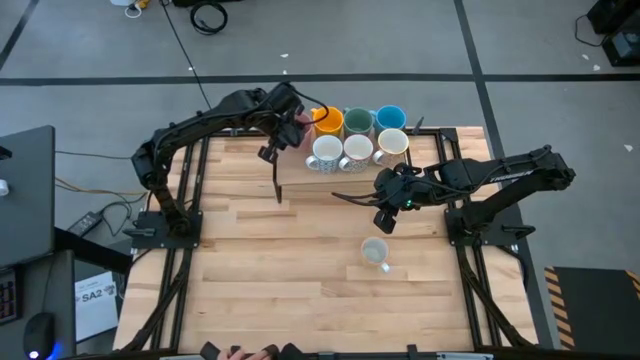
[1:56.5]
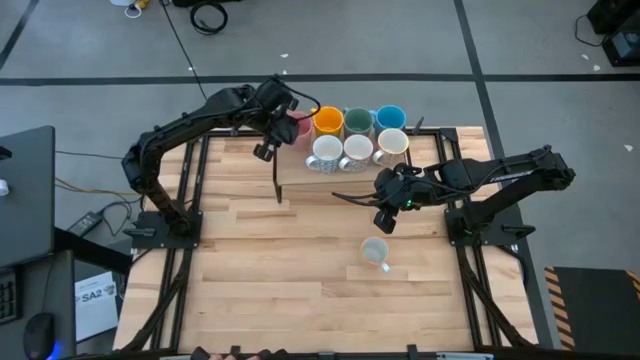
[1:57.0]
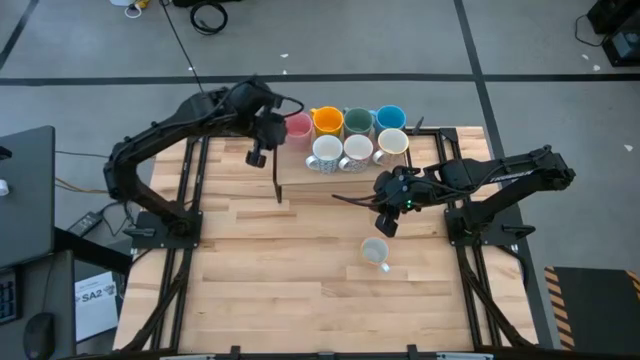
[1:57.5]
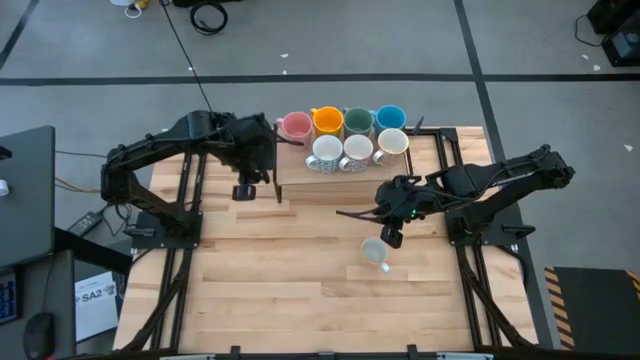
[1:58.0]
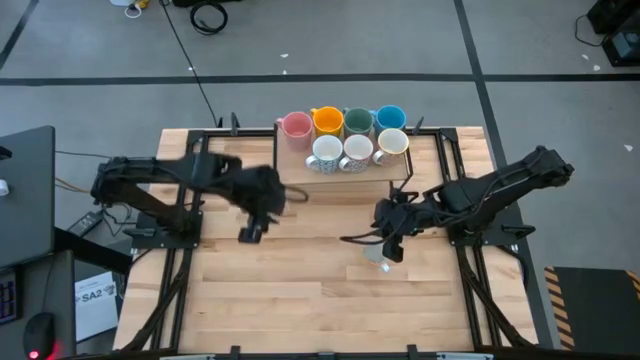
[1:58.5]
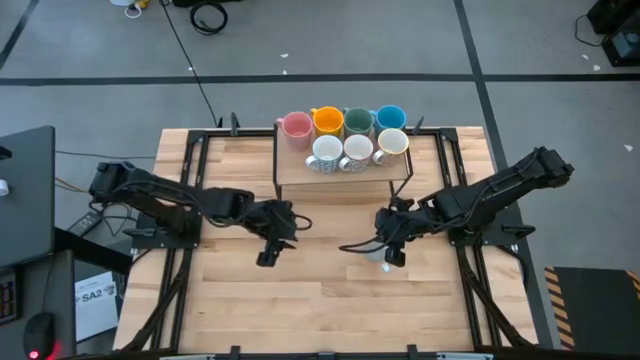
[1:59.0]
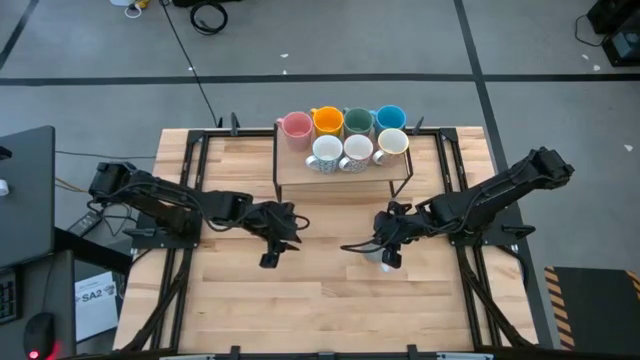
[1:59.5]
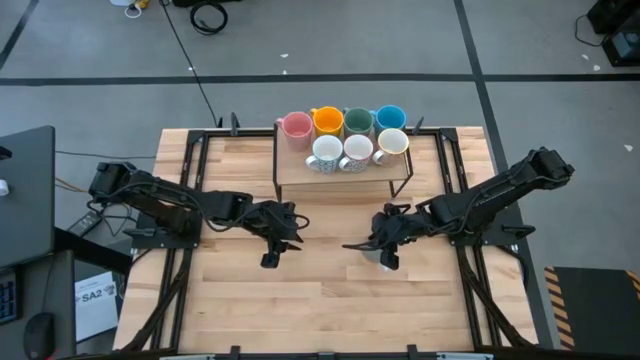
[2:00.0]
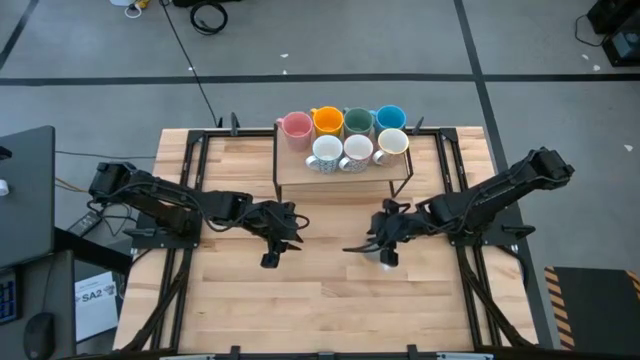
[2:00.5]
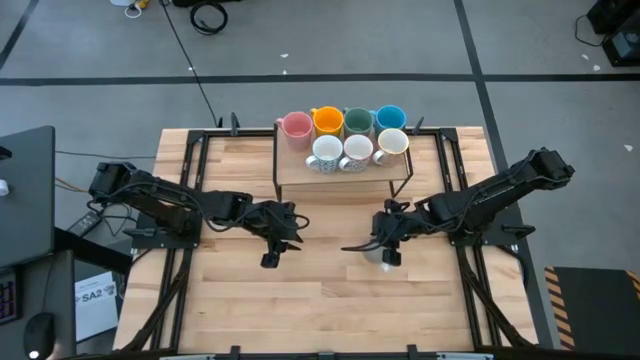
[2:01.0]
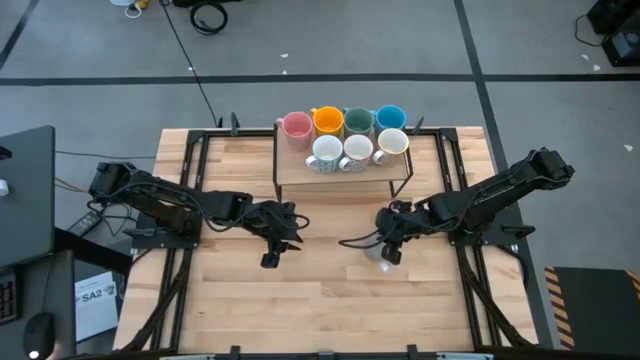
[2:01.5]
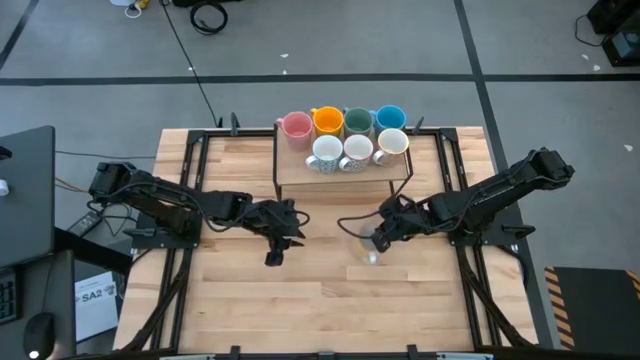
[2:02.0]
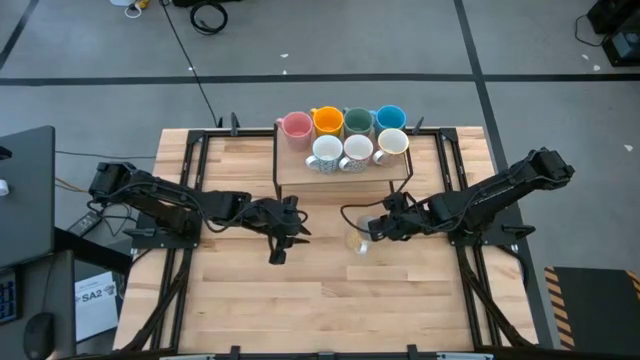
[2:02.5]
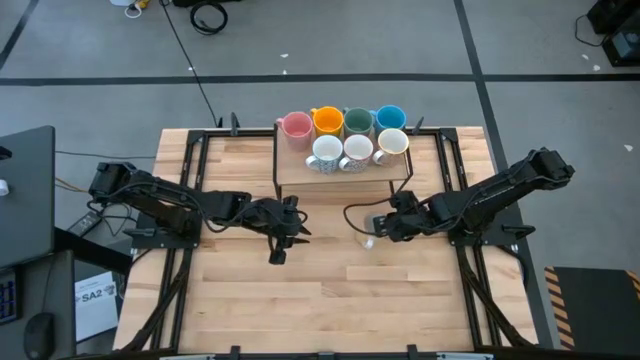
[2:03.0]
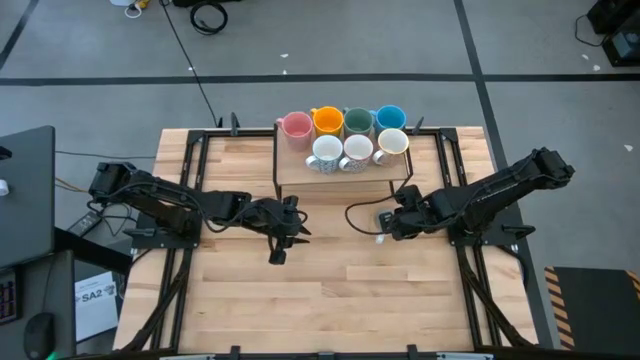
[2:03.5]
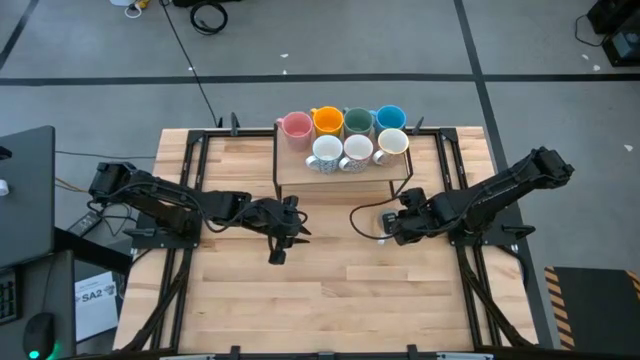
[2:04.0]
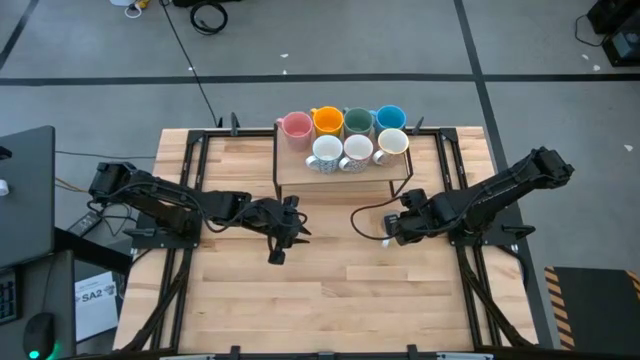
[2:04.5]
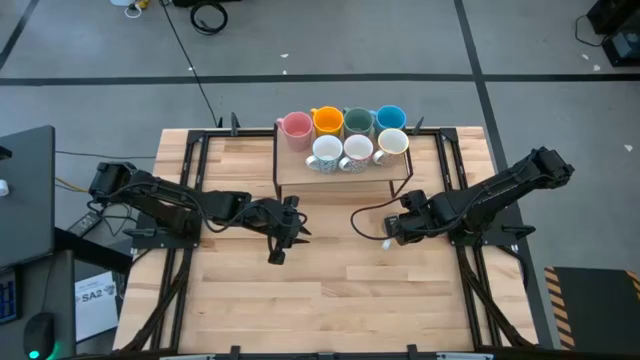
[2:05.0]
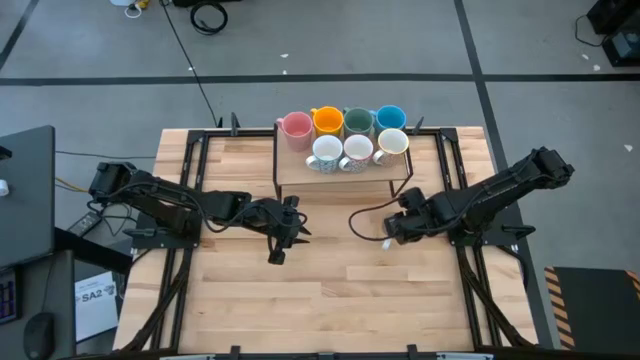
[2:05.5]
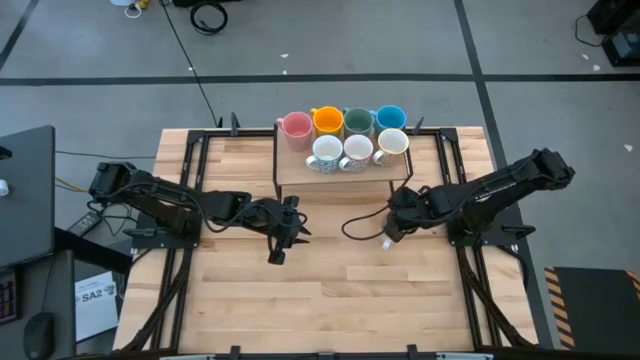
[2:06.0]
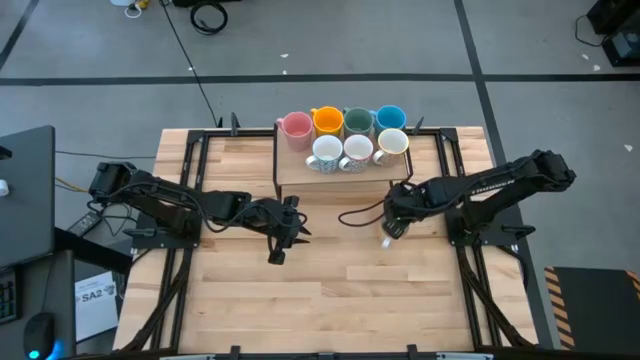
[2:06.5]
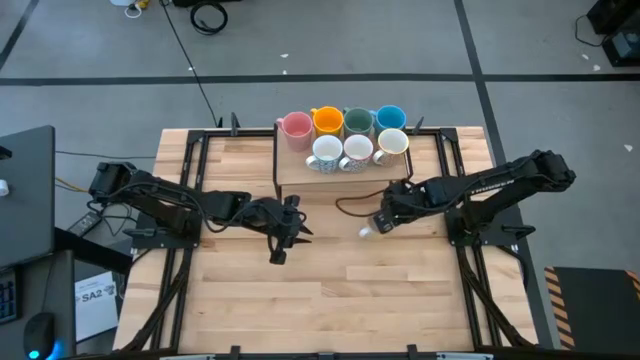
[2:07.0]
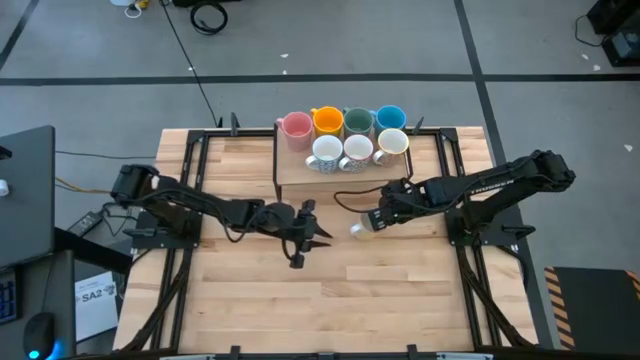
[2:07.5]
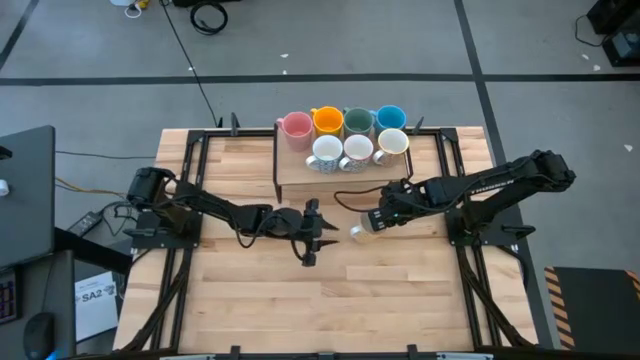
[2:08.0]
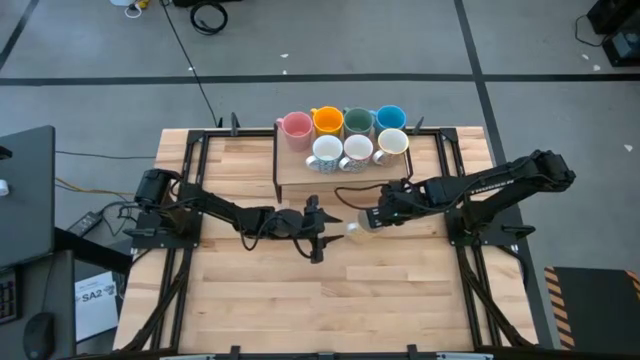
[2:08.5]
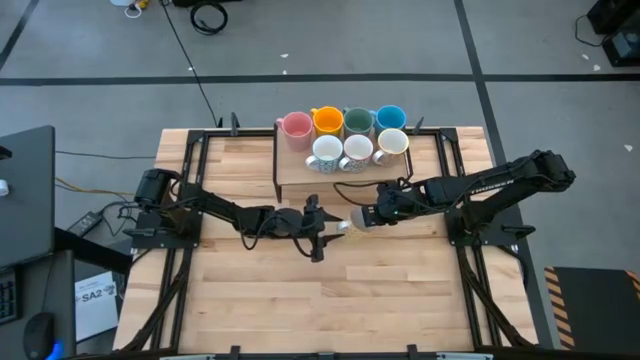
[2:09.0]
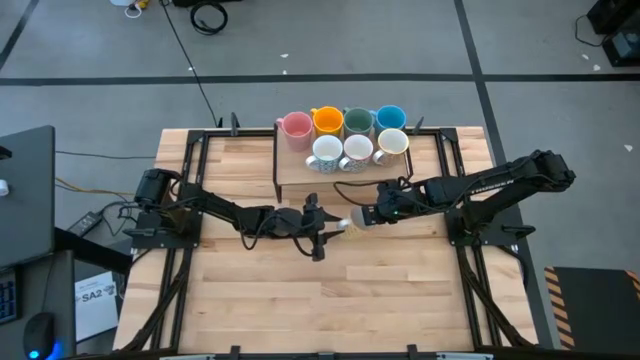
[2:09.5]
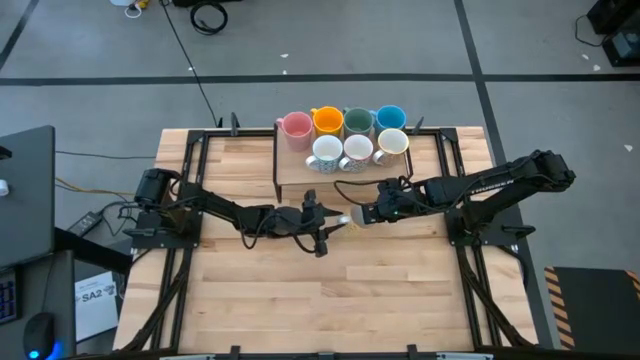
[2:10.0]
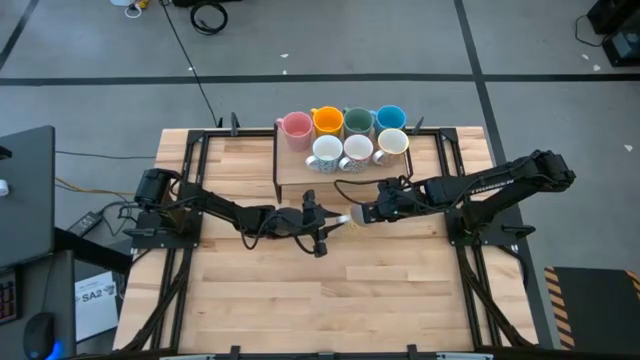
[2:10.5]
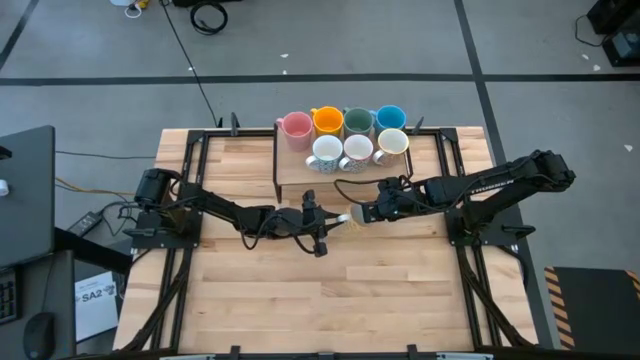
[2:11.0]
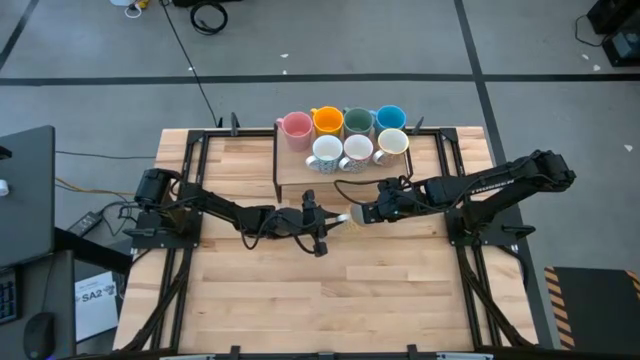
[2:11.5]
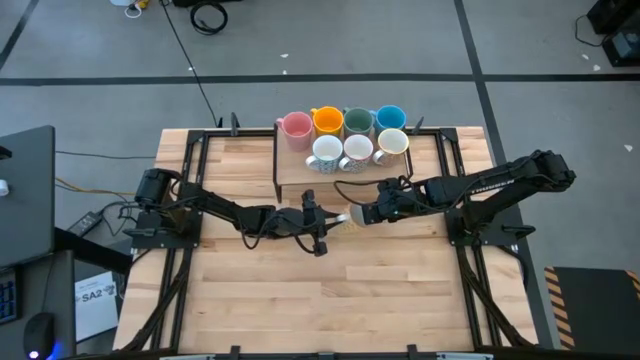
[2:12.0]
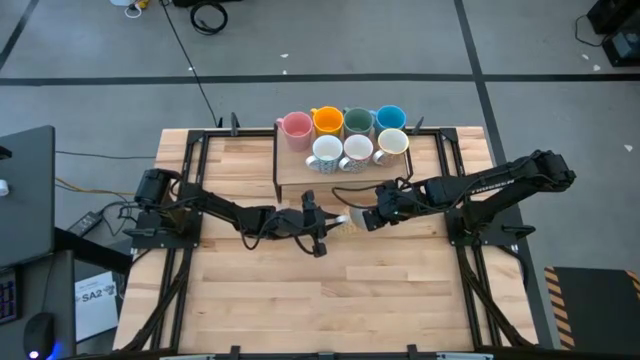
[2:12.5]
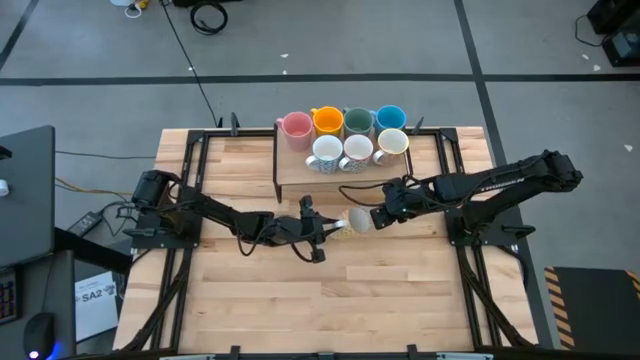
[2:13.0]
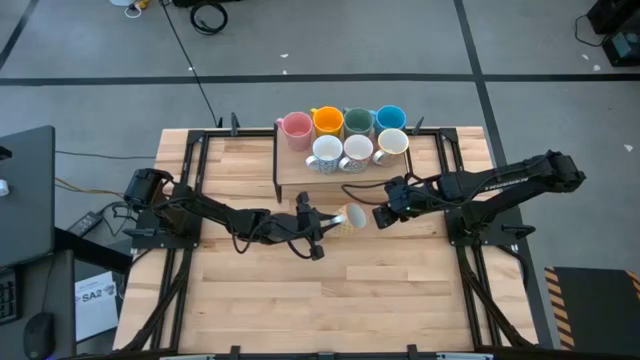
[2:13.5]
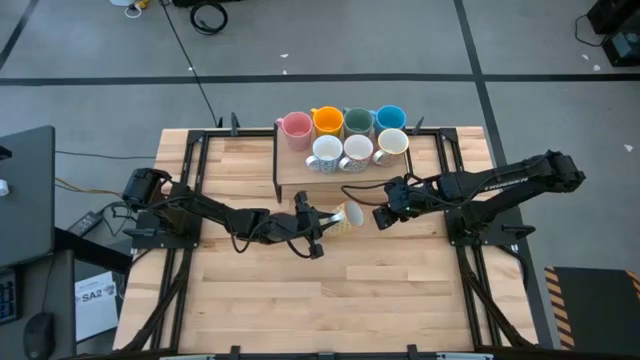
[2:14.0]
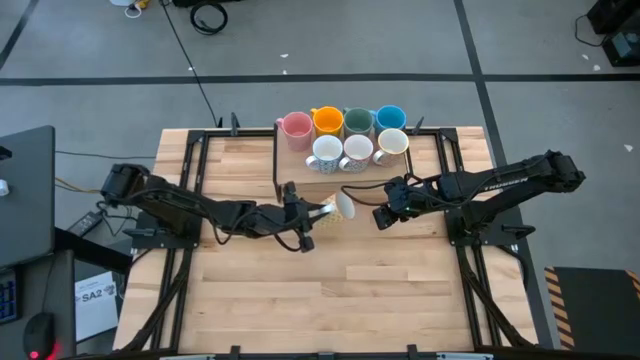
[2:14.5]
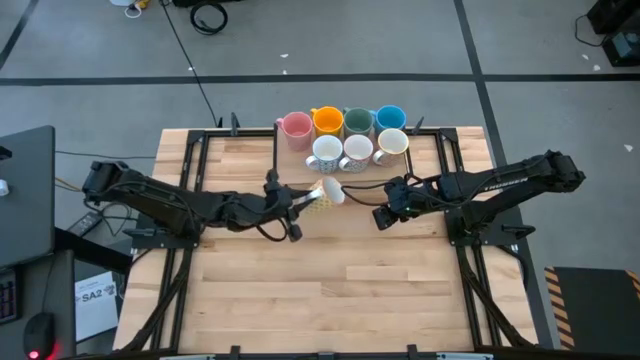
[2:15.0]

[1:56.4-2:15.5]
Task: Place coffee mugs
Put the white-yellow mug on the shelf

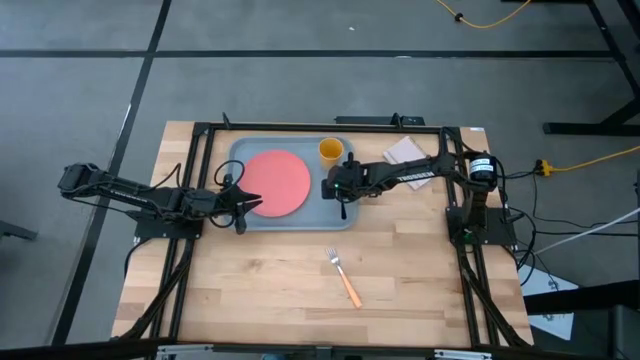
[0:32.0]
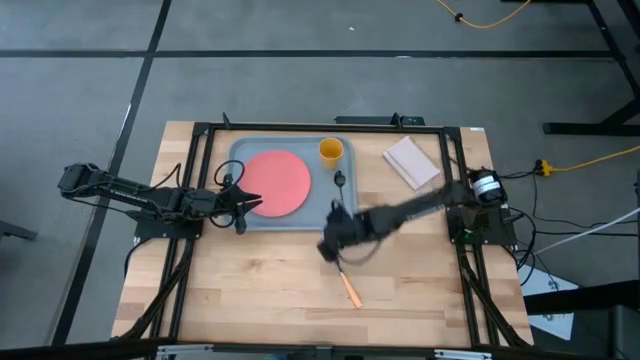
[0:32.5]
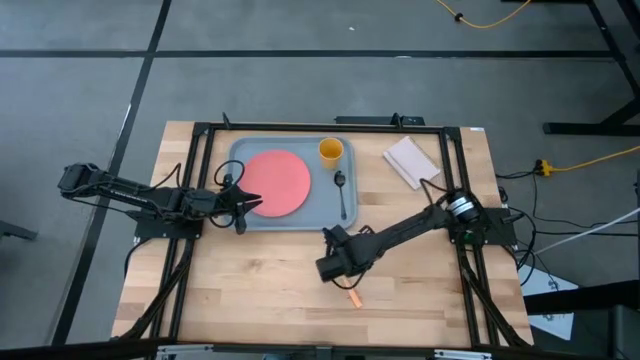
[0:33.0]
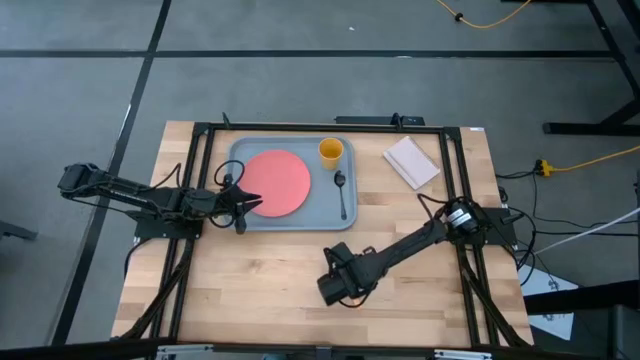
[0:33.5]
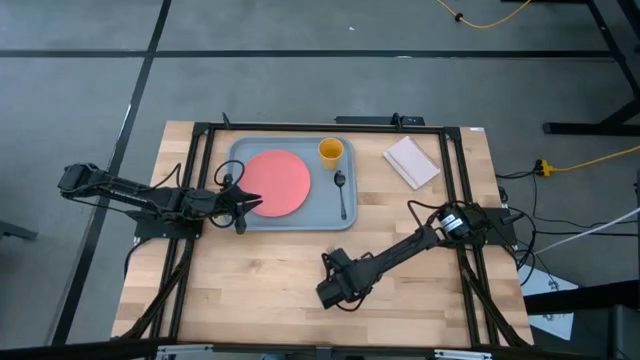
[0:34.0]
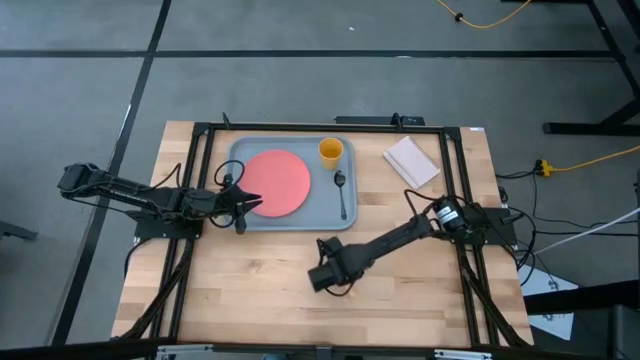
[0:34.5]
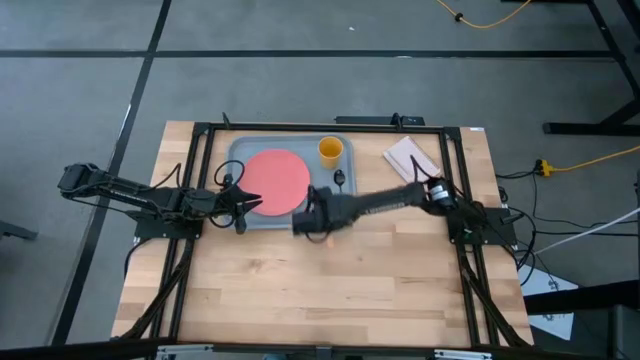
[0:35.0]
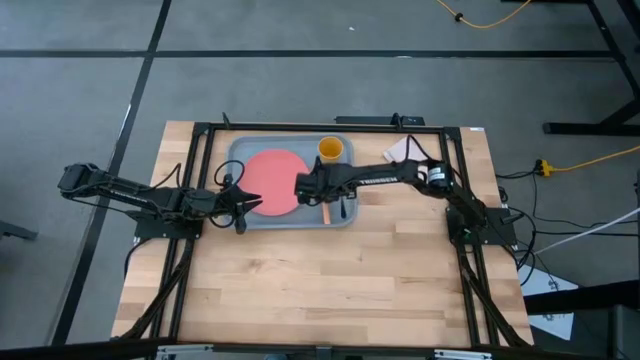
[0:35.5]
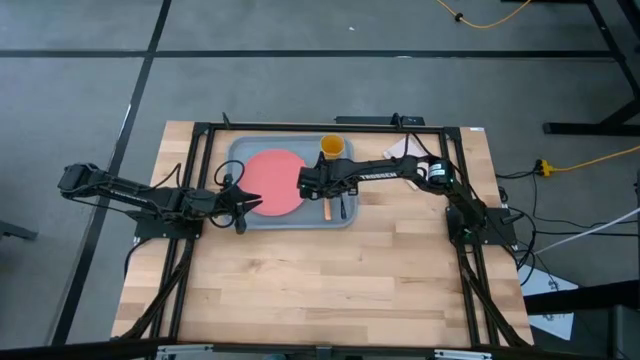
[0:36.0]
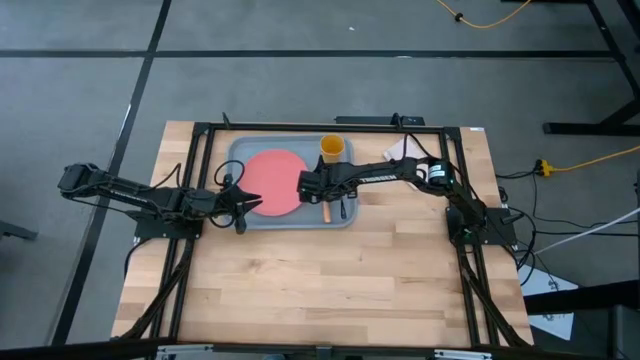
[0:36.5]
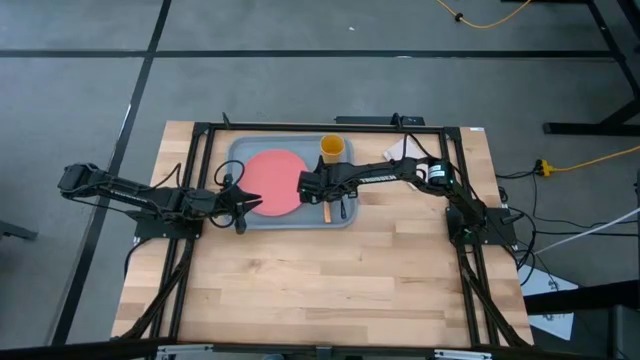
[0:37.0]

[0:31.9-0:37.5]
Task: Pick and place plate/cup/fork/spoon on tray
Put the yellow spoon on the blue serving tray to the left of the black spoon
